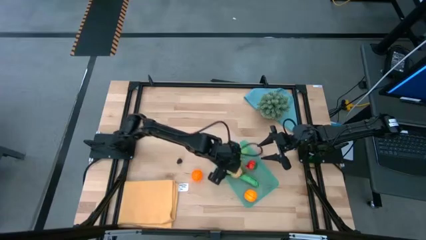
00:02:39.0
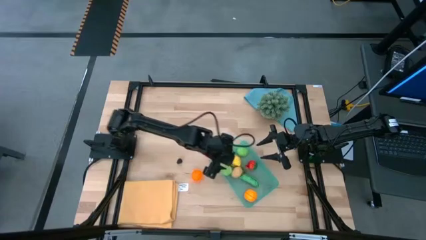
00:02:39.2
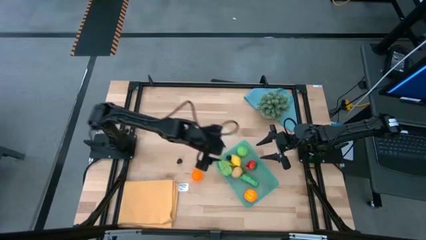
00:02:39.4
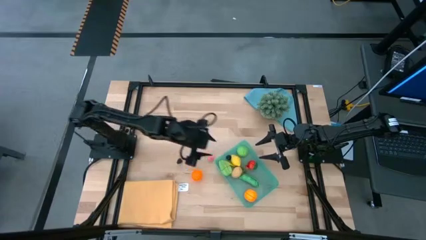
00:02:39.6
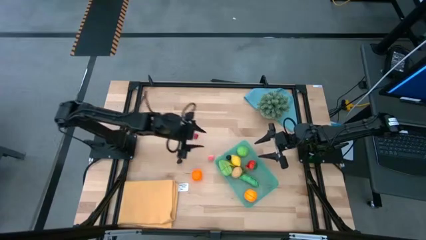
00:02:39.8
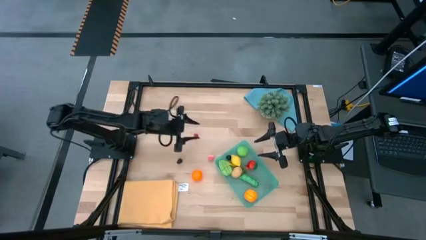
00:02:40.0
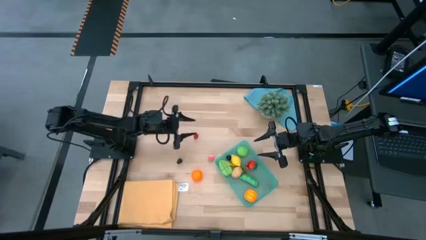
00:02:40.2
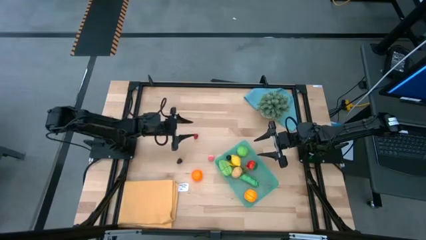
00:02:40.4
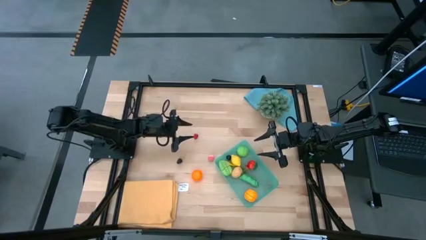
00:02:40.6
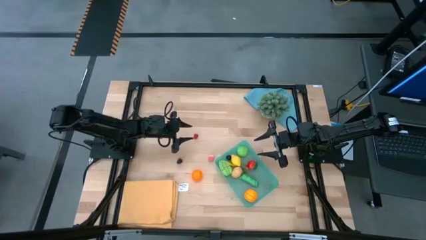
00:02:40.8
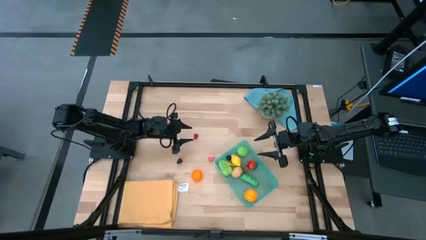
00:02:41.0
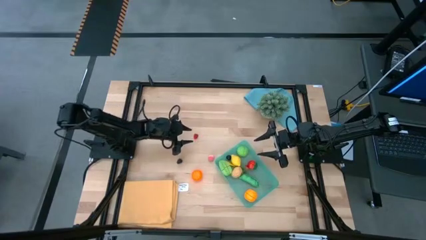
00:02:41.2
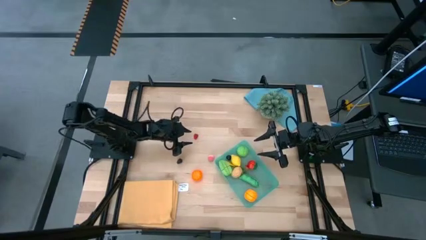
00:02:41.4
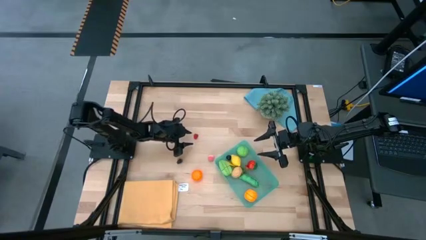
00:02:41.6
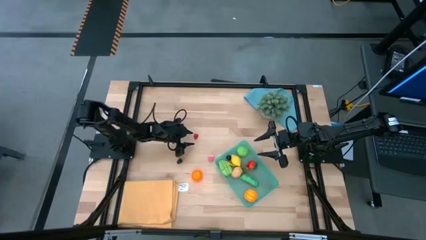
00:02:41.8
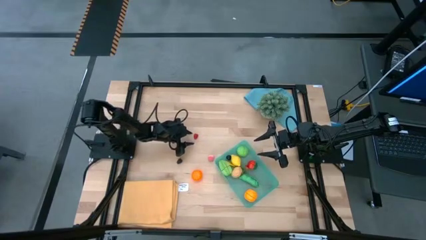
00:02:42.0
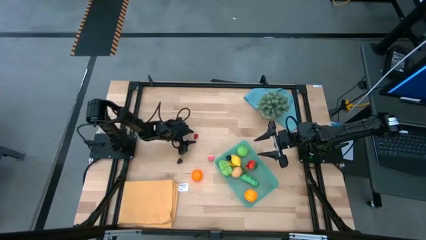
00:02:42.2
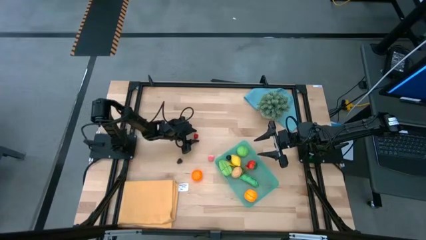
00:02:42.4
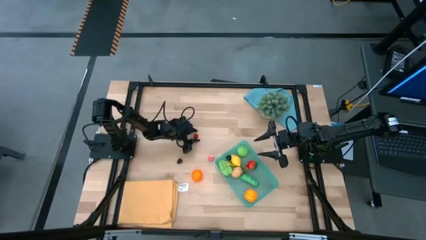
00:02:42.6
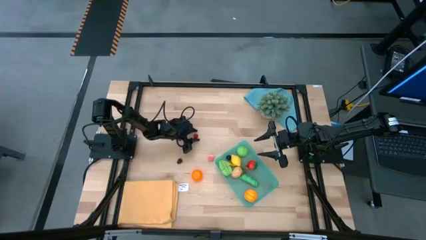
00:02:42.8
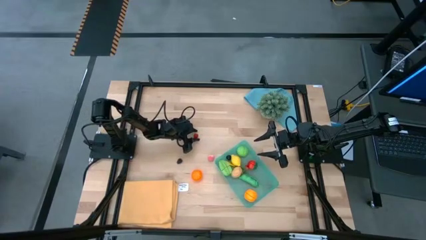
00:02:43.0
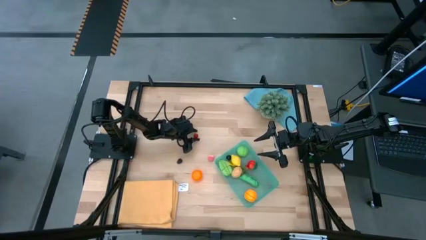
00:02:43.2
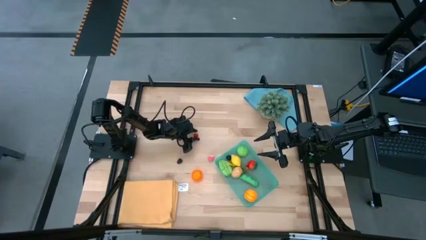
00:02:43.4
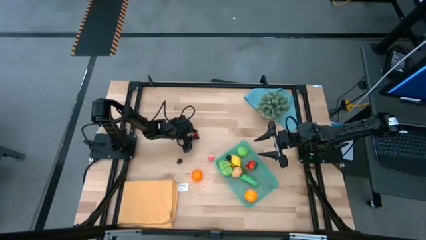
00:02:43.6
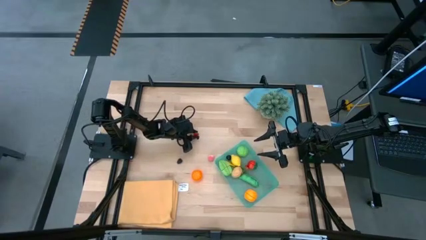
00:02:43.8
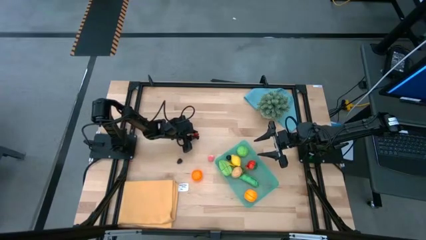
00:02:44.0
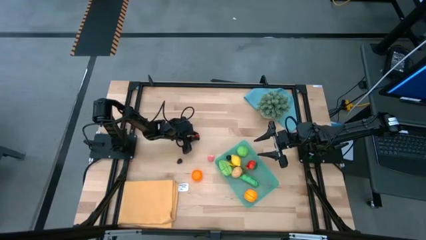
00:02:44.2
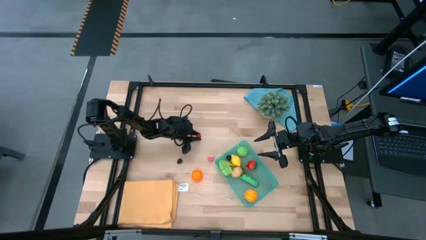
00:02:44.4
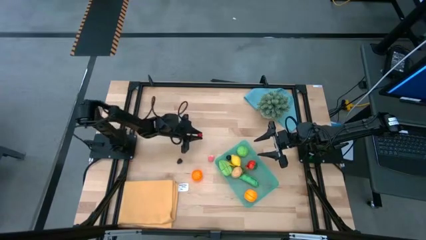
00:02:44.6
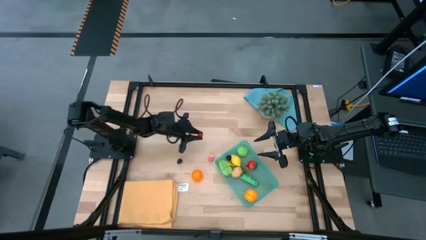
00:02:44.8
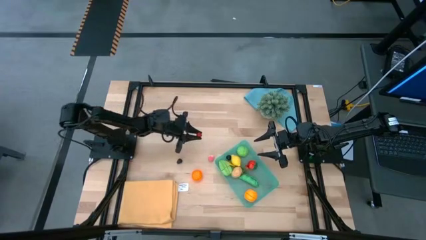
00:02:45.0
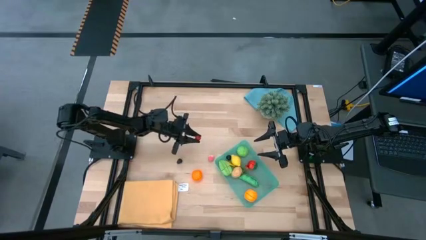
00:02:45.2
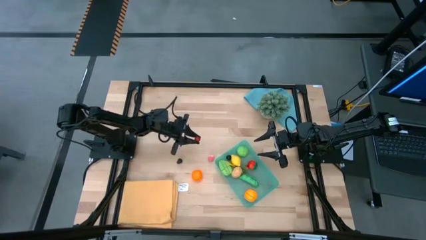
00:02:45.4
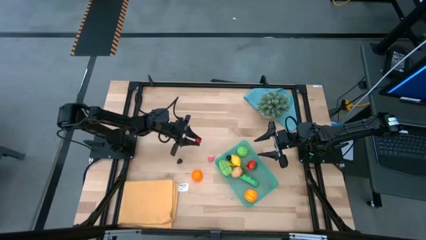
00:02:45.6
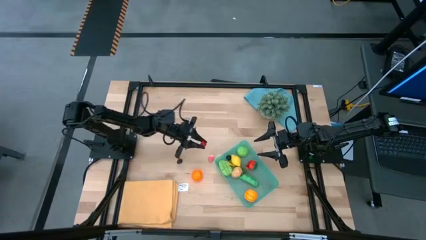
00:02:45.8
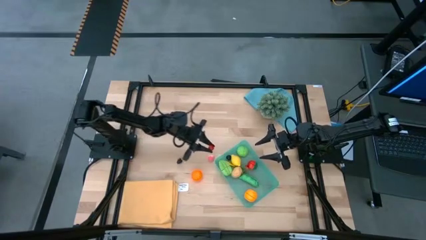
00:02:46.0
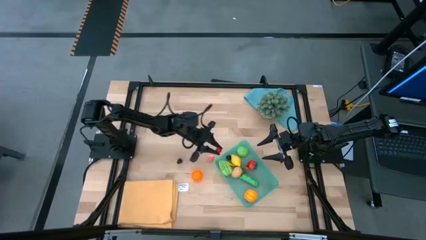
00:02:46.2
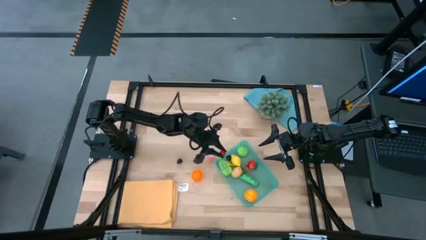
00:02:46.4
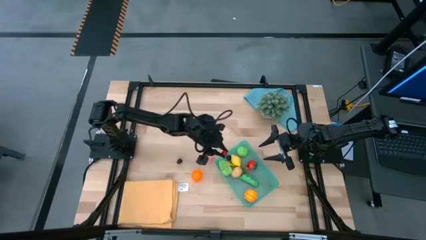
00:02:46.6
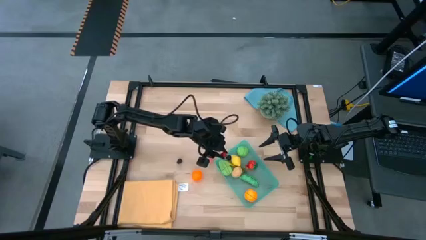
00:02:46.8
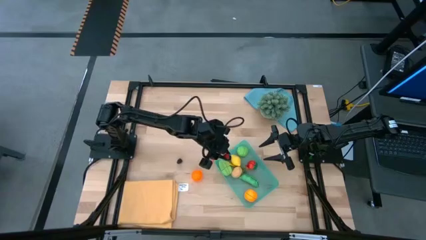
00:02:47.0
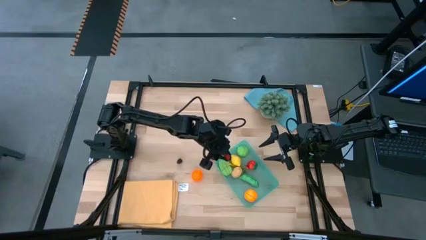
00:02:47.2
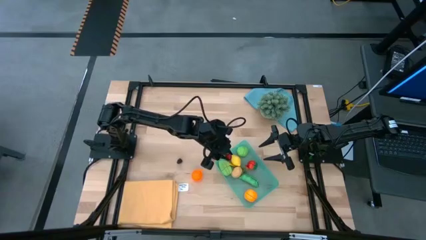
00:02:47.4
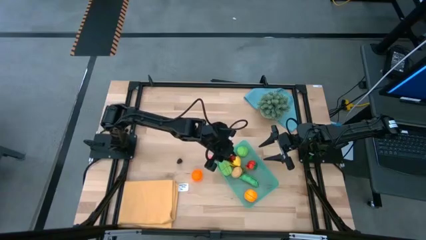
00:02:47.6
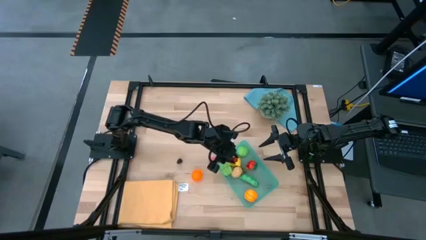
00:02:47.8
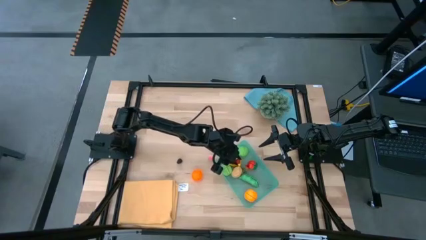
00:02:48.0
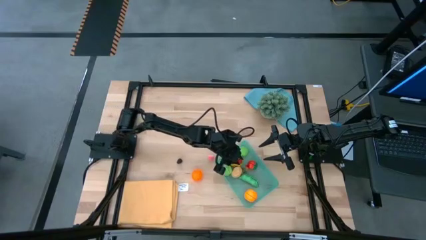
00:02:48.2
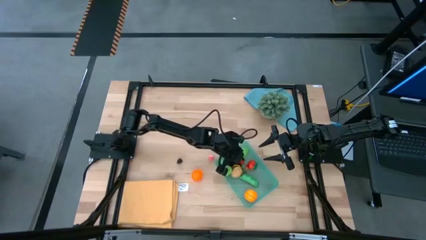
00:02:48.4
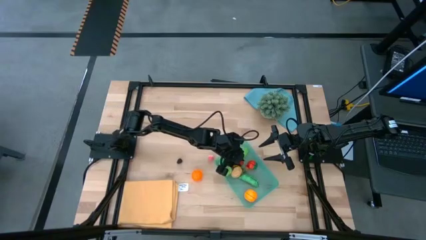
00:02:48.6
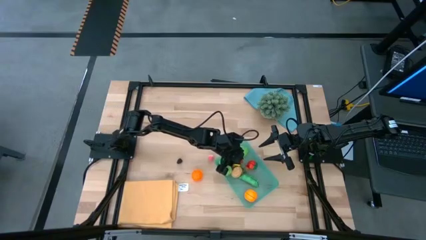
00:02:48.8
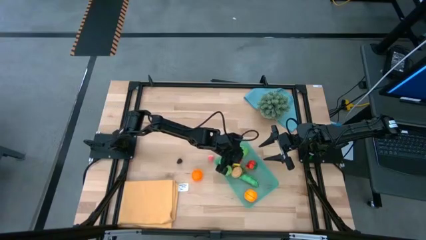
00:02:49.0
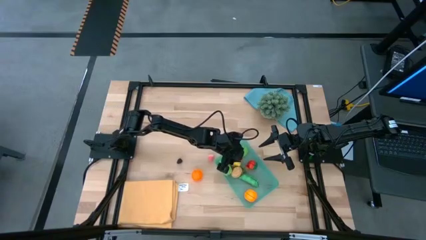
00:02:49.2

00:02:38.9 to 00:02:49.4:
Task: Pick and placing Produce into tupperware
Put the raspberry into the green bin

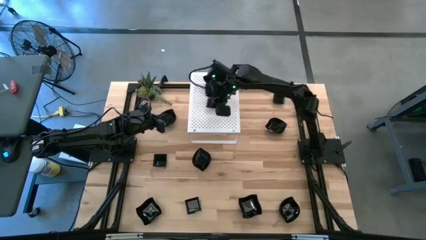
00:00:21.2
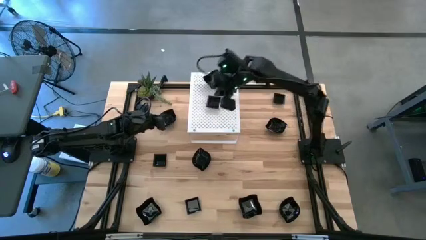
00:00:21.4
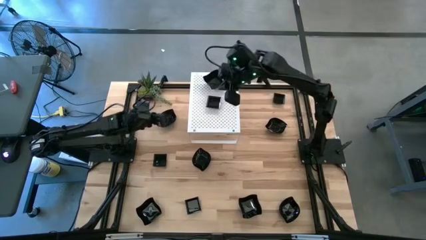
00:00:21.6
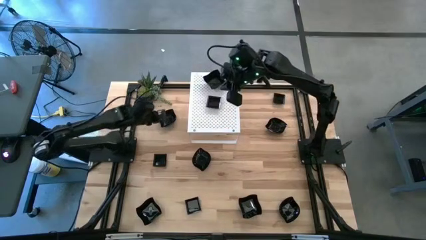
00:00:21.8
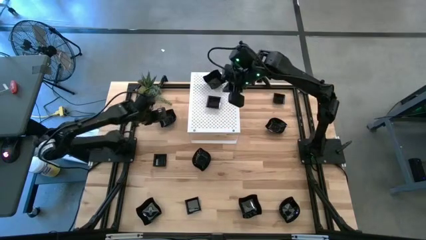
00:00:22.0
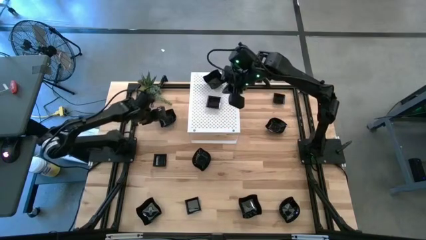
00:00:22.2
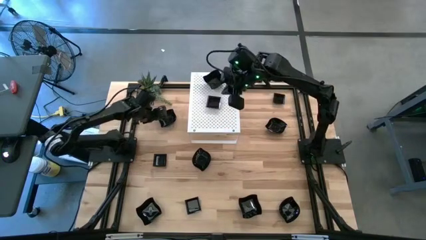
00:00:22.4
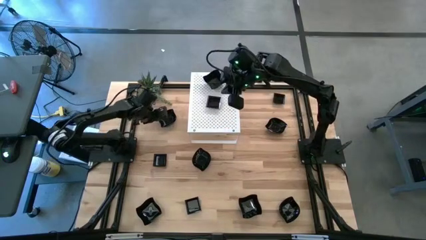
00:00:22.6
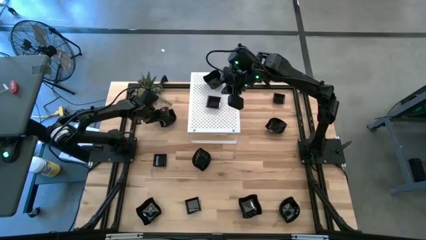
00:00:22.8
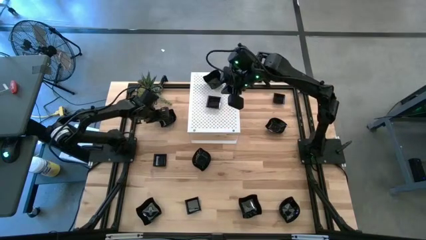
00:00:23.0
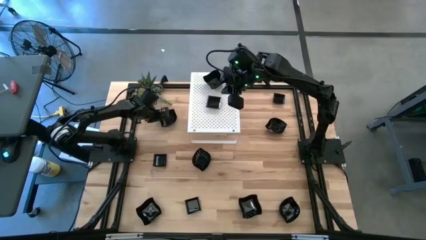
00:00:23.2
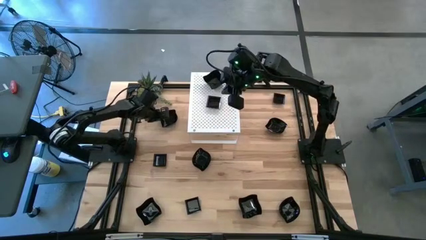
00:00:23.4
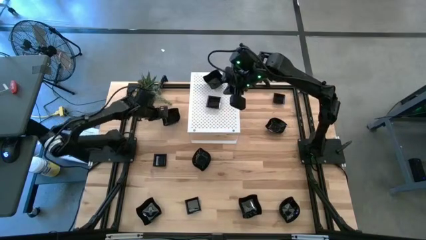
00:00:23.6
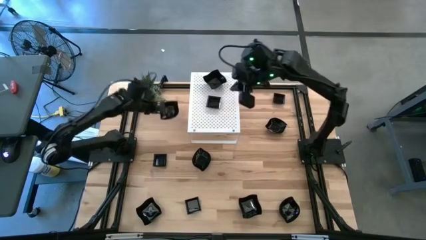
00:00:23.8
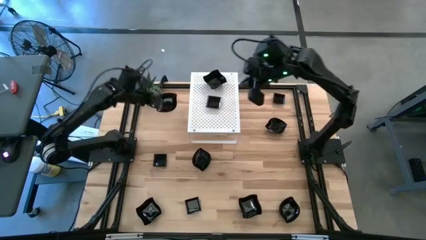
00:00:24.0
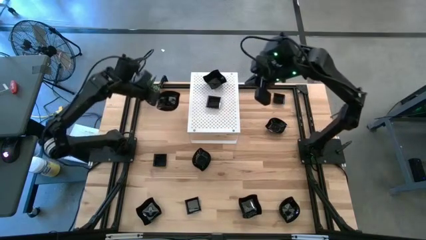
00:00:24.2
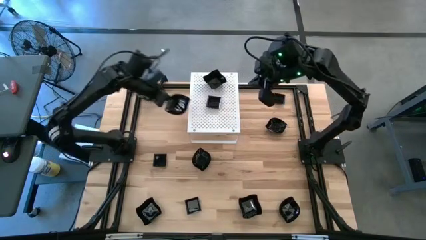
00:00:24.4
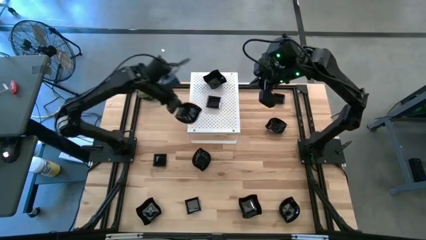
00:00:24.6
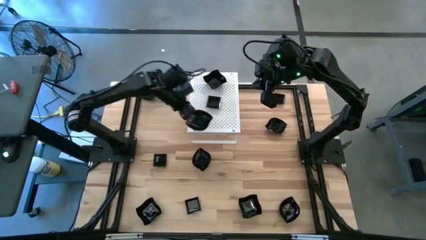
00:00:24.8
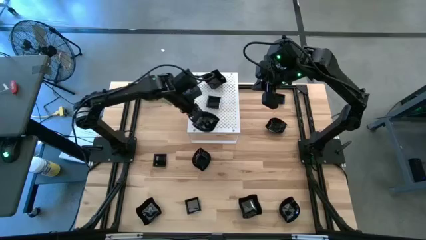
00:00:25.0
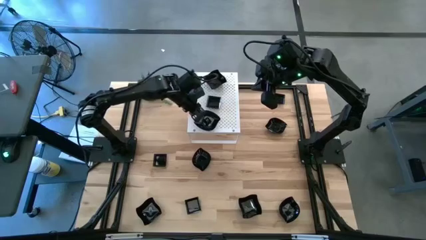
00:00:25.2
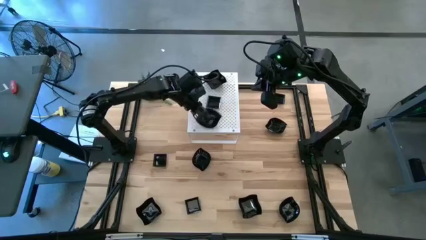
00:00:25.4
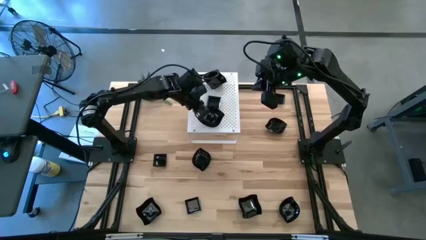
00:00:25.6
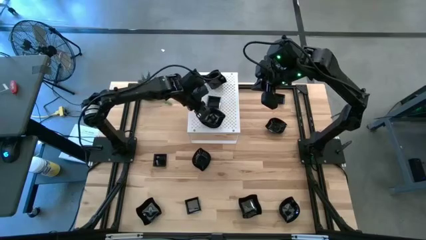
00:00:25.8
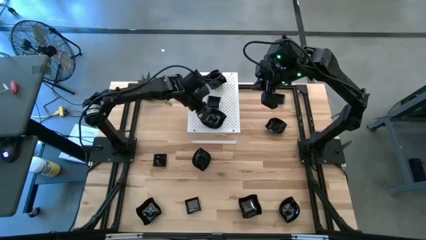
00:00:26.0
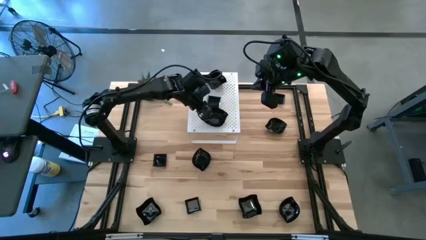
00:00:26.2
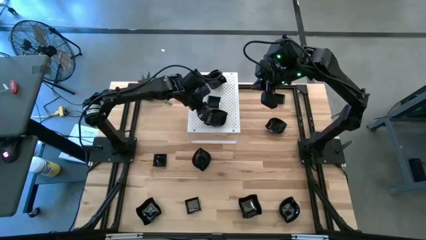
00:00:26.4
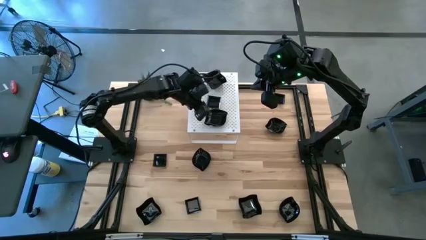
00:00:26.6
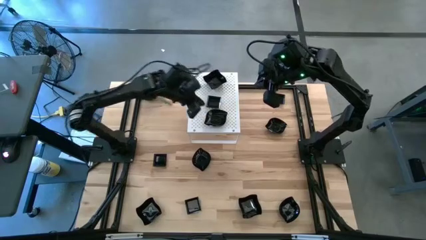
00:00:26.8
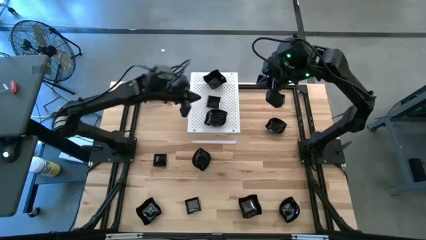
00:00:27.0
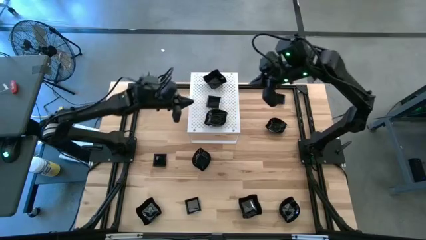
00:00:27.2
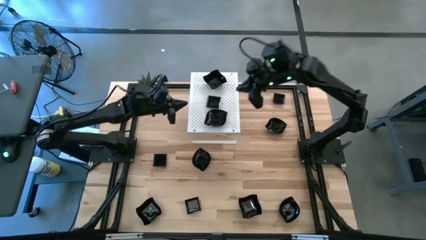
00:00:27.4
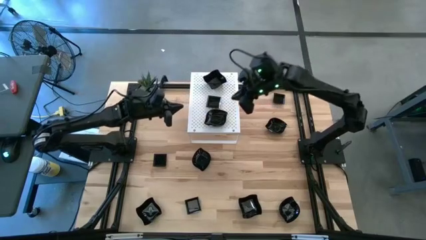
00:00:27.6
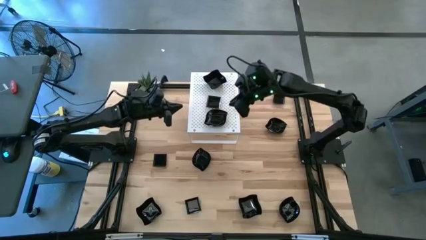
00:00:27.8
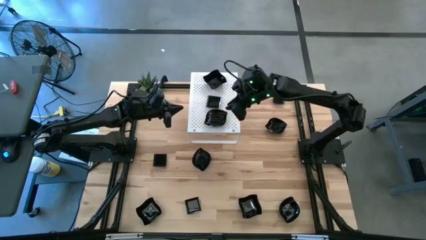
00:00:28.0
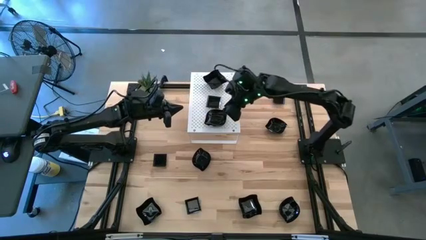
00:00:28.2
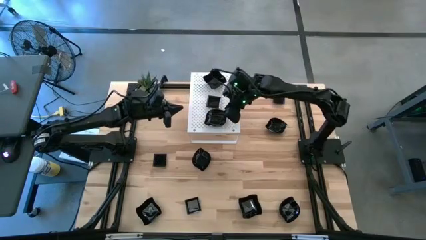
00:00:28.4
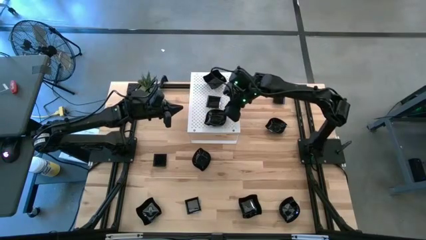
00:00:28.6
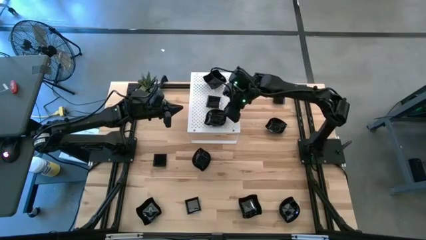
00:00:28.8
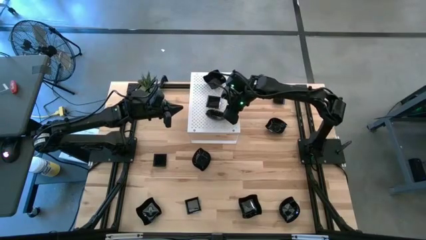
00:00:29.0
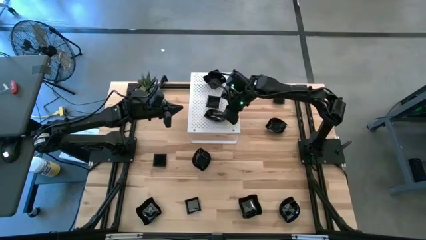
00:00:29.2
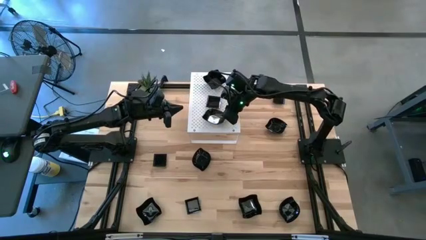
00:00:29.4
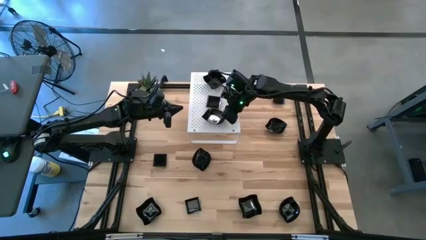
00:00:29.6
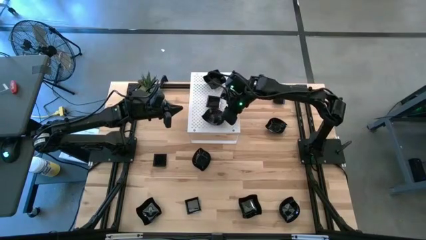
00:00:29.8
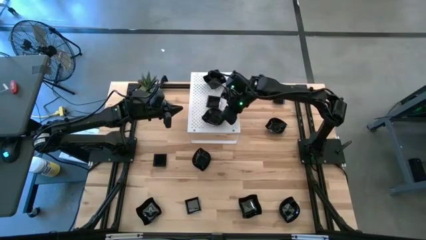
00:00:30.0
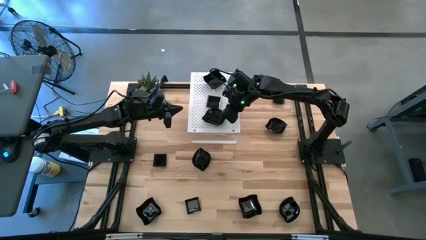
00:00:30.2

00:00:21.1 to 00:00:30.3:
Task: Pick & Place Mini shaped plates
Put the black leaf-shaped plate on the shelf
